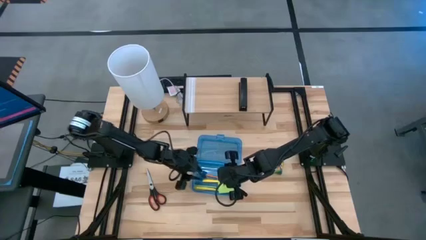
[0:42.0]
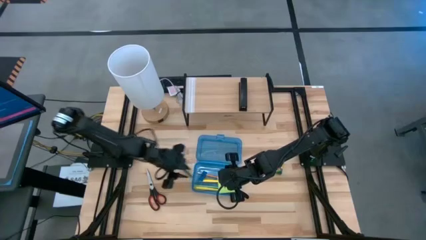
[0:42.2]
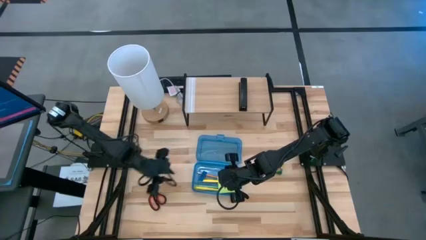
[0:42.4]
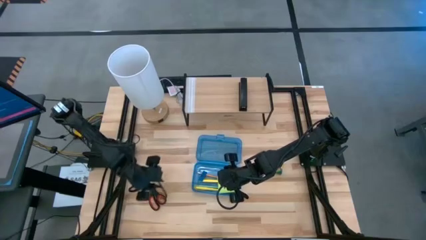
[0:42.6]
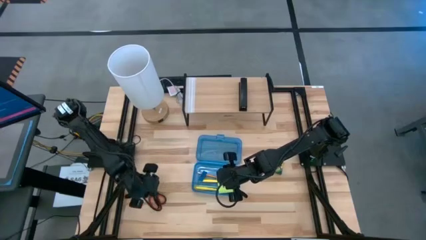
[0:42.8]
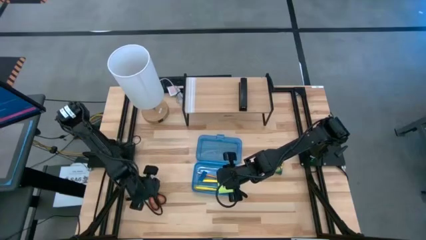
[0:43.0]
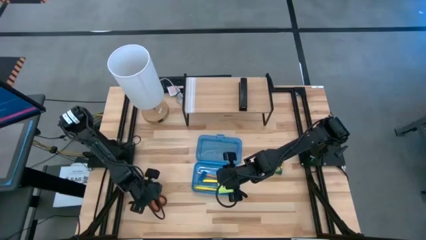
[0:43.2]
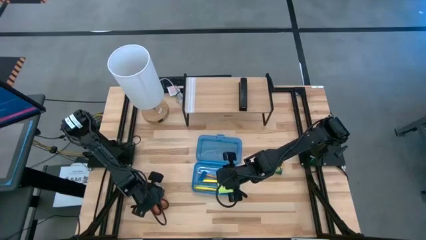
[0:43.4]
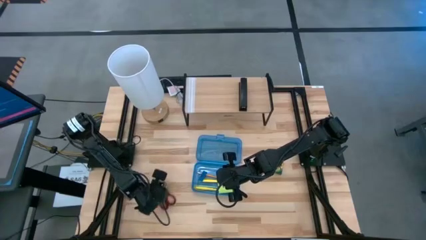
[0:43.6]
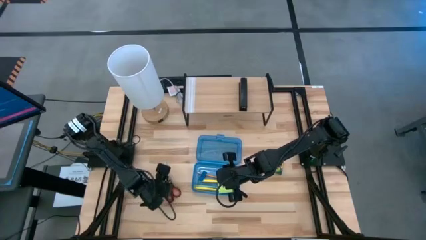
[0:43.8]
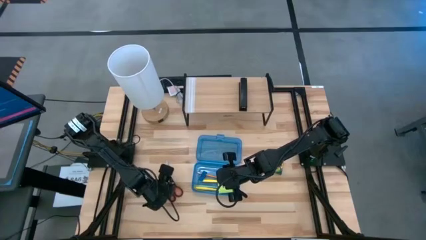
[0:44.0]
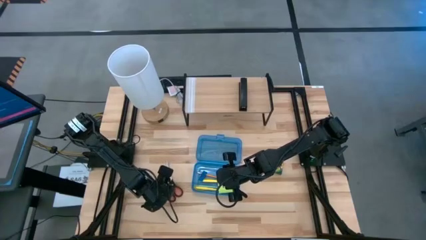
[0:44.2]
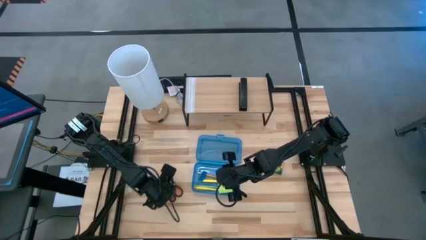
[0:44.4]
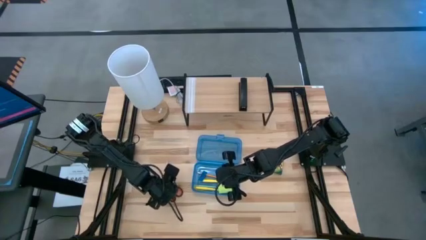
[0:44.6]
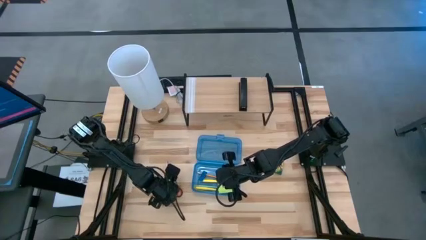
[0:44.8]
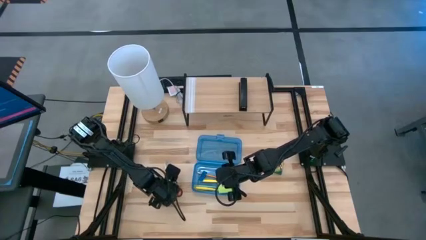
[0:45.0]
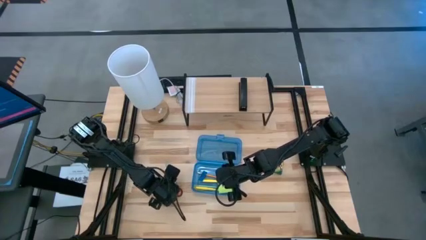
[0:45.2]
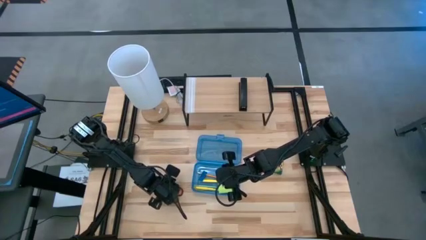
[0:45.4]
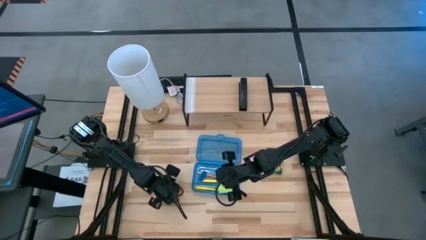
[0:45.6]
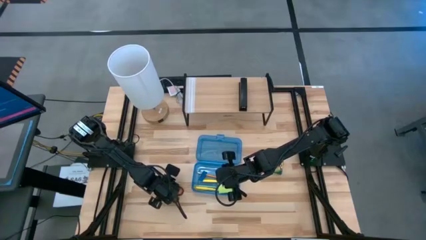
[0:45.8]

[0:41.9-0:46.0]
Task: Pack school essentials
Put the black scissor into blue supply box

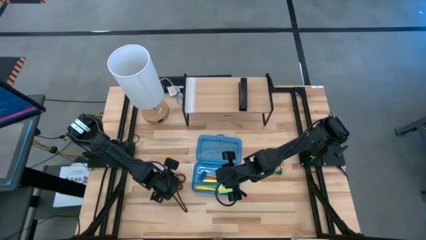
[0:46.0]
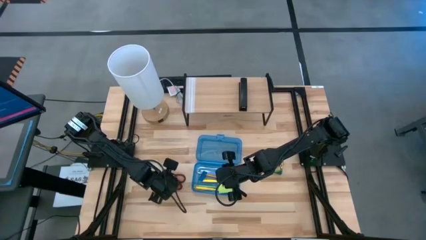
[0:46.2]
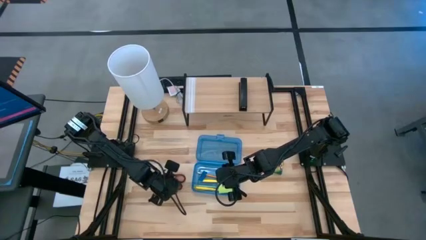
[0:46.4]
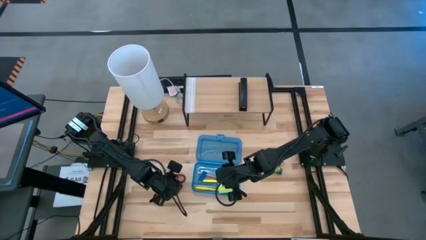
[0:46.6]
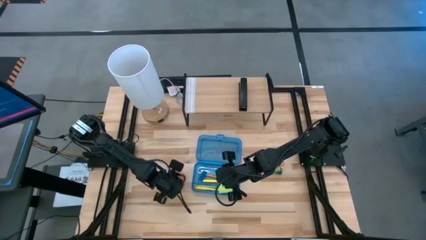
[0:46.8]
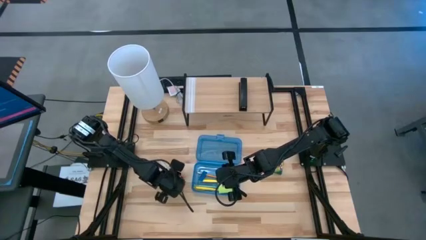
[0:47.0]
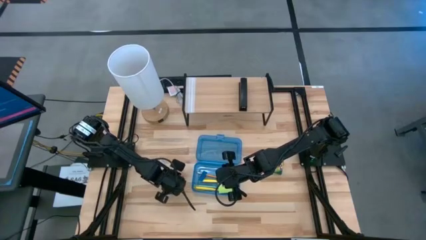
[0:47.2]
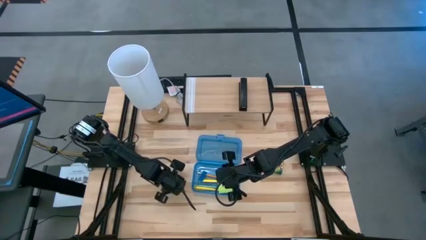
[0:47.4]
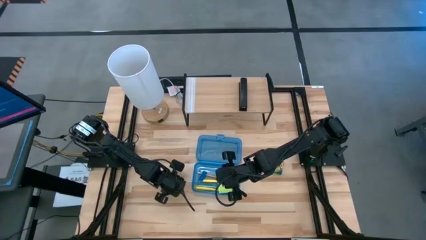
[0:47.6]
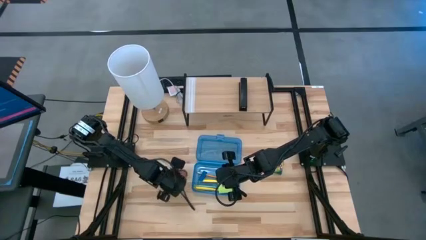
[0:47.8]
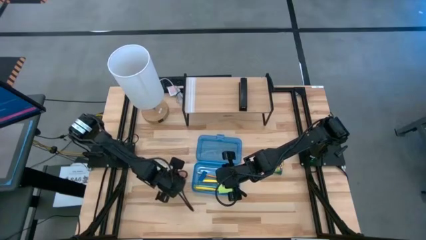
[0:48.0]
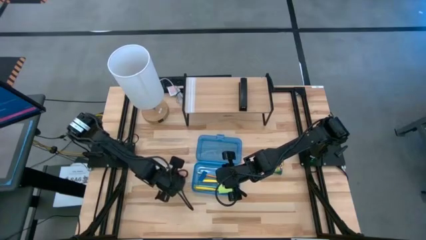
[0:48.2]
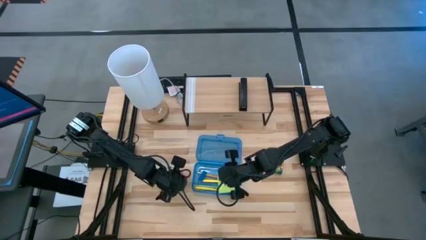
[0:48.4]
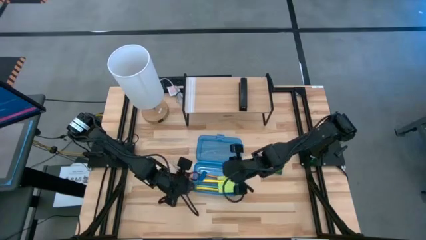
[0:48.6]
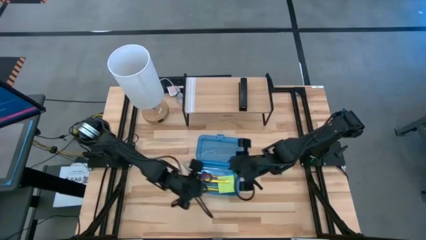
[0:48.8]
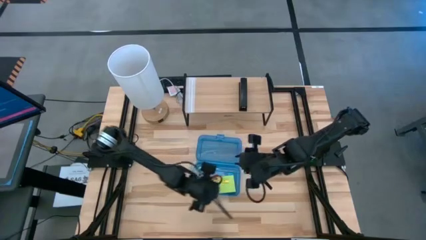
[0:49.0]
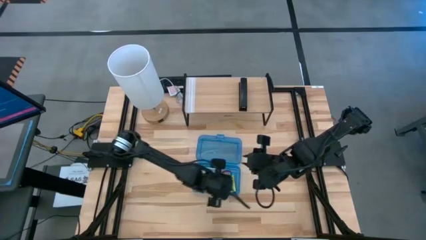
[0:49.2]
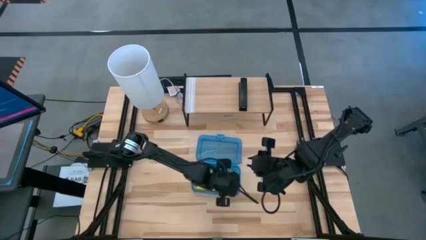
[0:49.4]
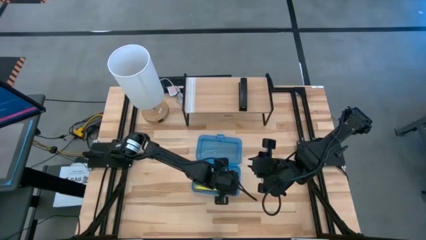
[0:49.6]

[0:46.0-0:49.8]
Put the black scissor into blue supply box

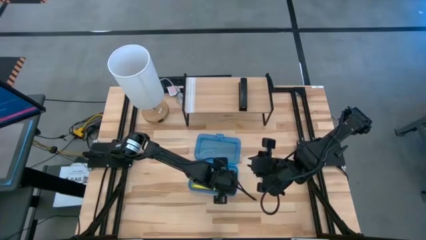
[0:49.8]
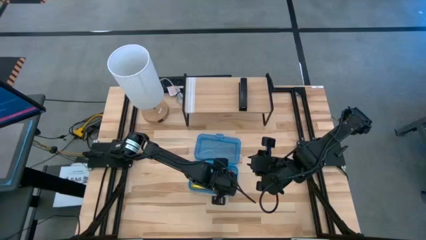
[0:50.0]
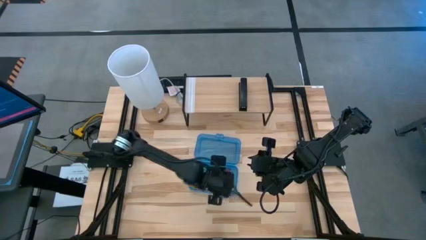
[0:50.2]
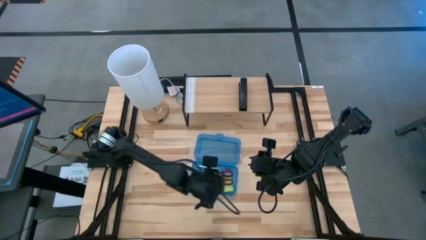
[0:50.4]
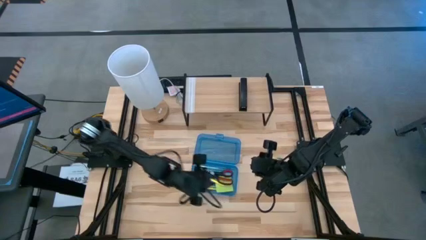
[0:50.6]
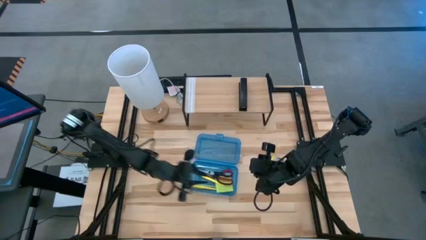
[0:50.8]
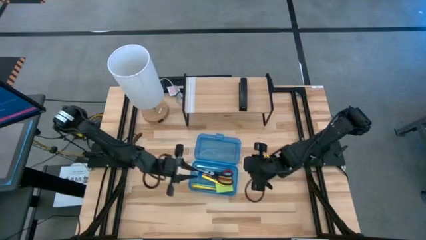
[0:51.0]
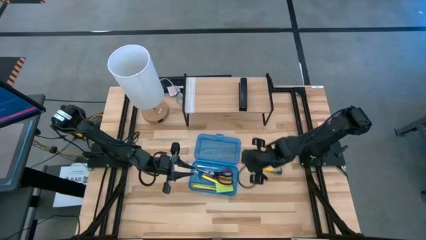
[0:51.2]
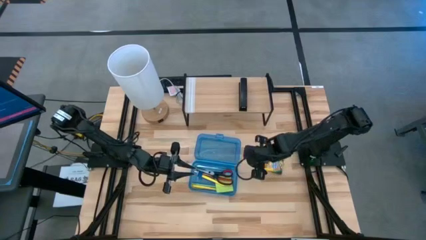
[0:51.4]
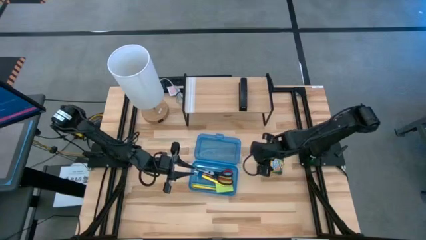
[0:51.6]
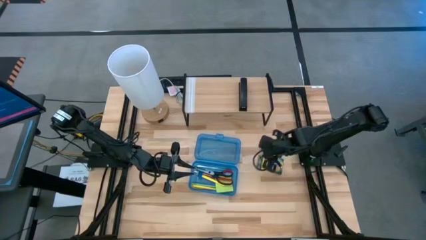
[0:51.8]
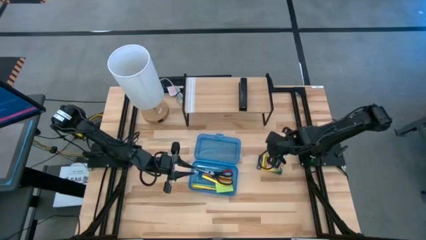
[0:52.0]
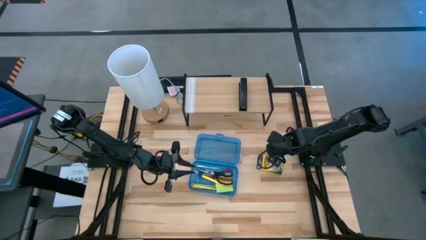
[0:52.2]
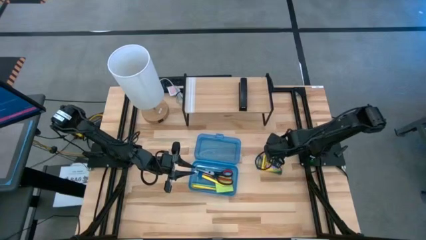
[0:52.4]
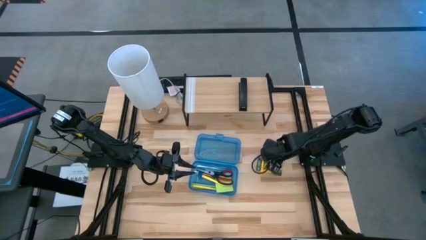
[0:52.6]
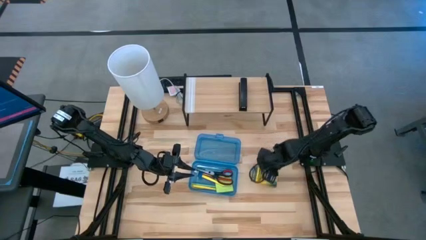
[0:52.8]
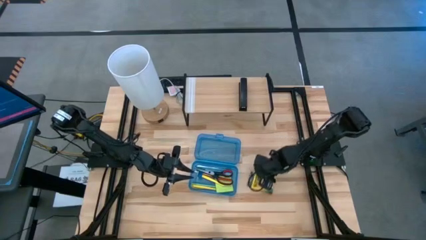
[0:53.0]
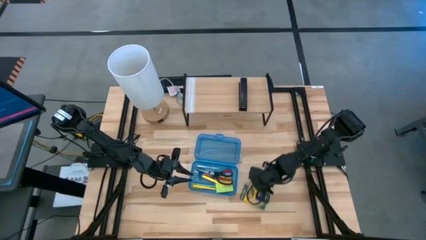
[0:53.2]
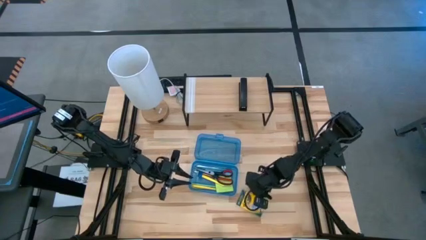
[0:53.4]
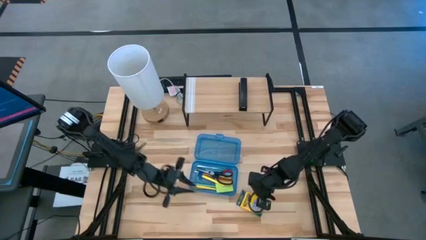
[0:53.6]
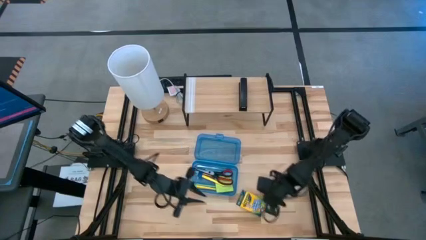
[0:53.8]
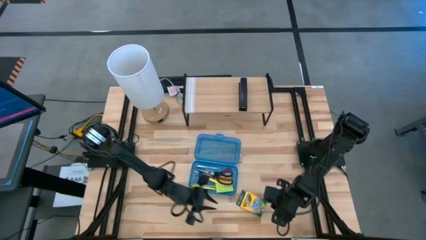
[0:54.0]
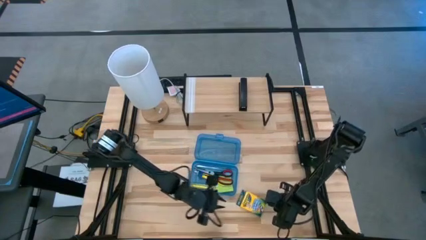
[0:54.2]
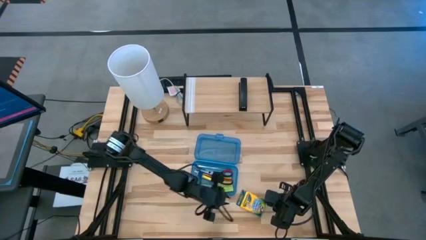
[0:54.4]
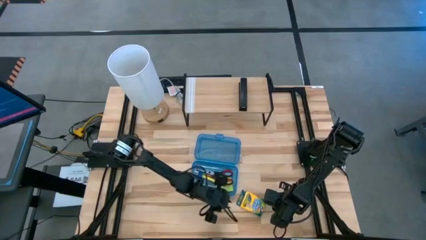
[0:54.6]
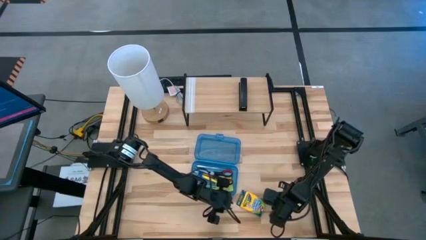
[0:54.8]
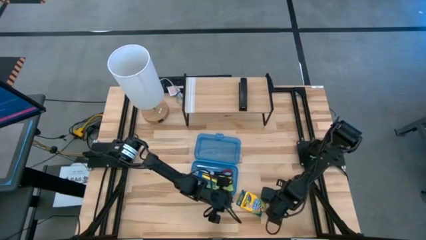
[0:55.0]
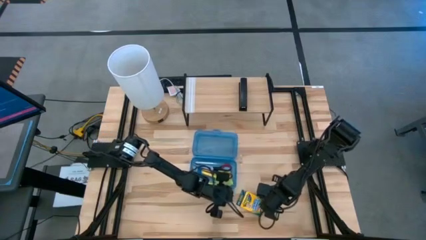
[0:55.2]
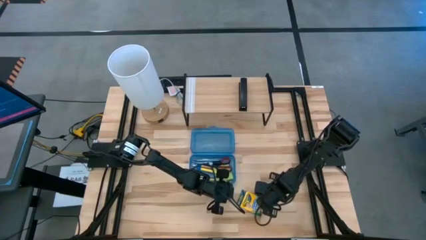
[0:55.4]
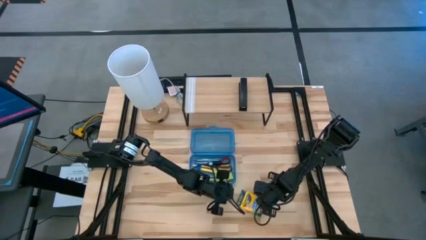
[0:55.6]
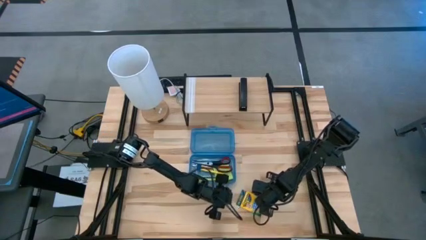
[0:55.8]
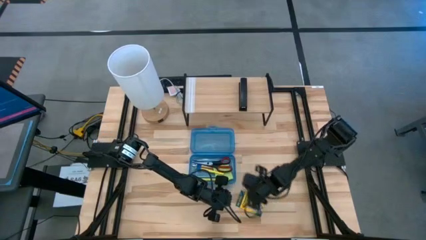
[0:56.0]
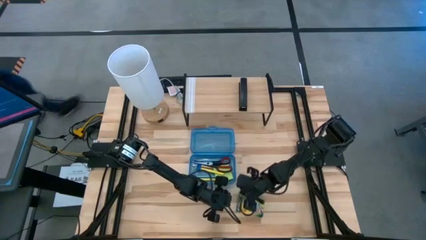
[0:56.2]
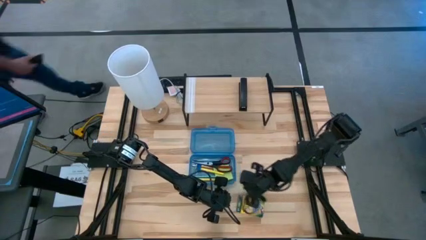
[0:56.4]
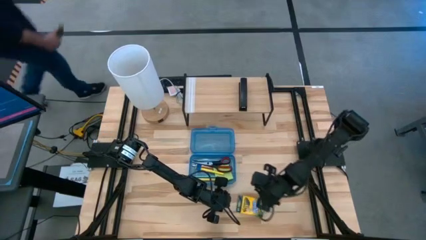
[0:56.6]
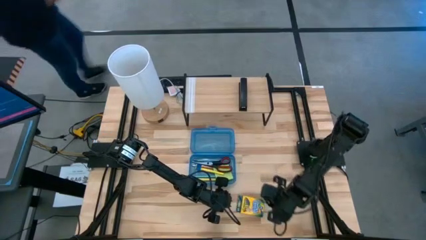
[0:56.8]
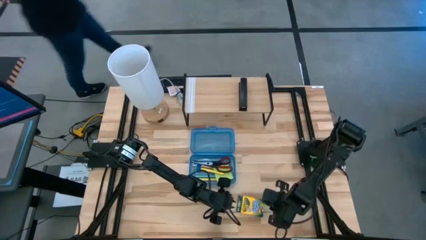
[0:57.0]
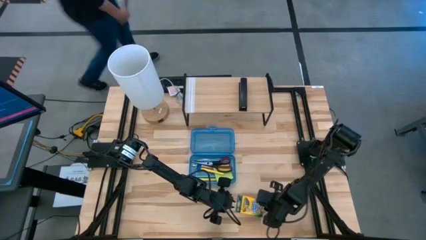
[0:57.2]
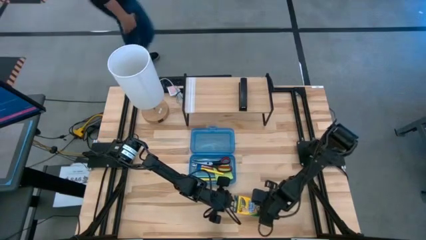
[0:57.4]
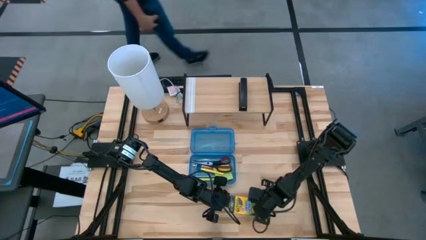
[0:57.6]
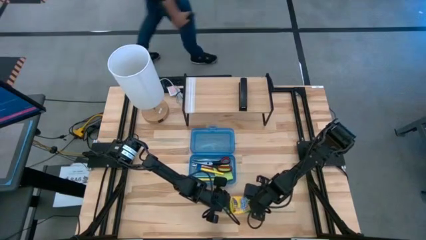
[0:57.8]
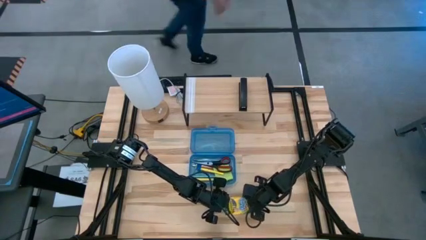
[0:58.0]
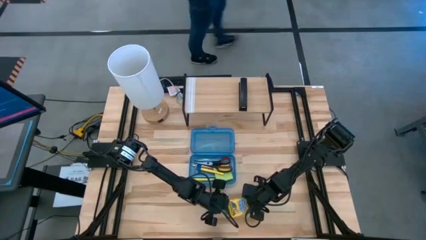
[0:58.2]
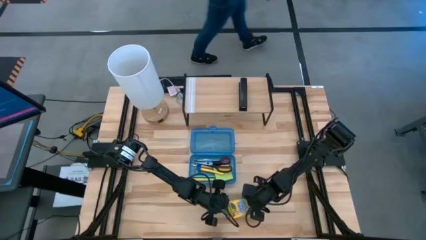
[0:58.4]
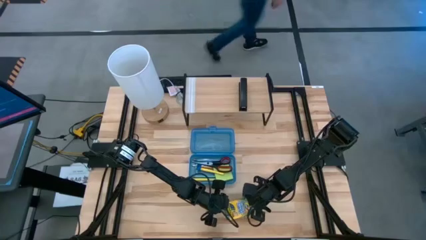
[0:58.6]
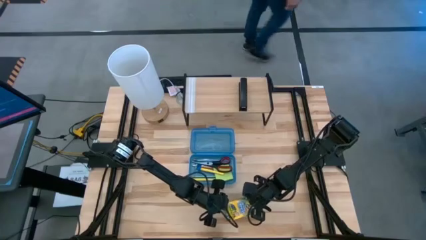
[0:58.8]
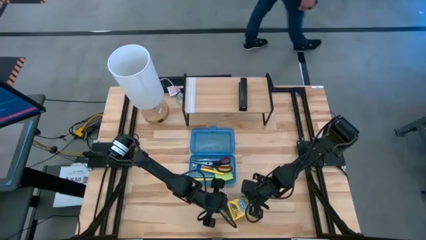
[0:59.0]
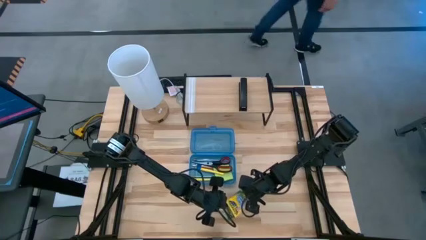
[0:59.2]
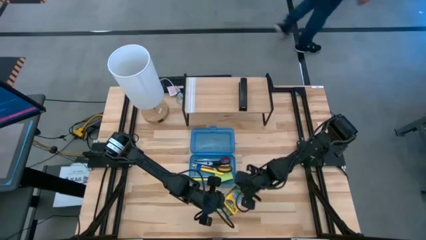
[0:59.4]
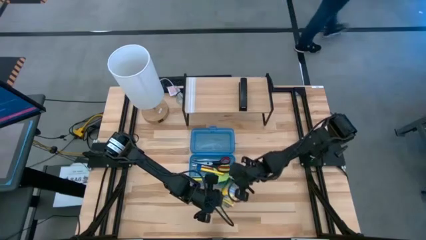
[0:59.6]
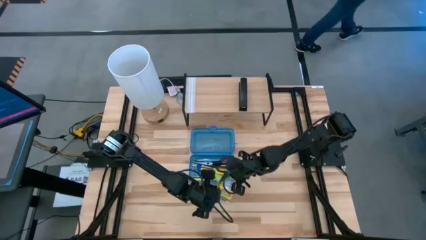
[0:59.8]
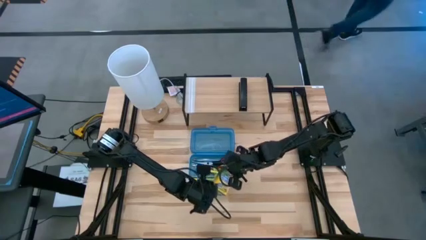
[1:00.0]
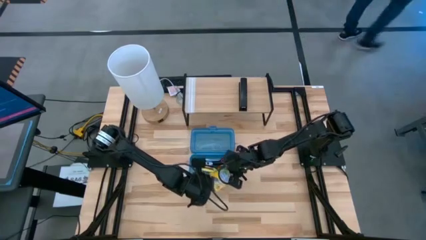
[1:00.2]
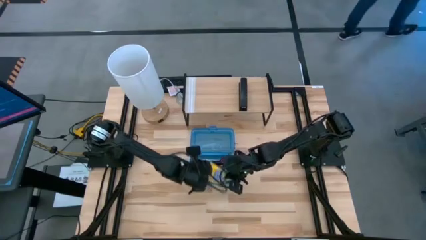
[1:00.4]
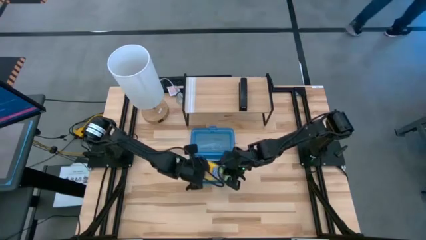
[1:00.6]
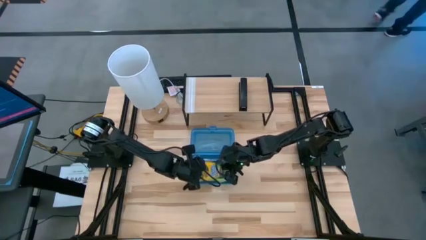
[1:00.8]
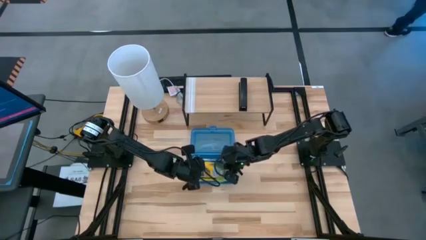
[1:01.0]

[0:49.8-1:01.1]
Put the crayon box into the blue supply box
